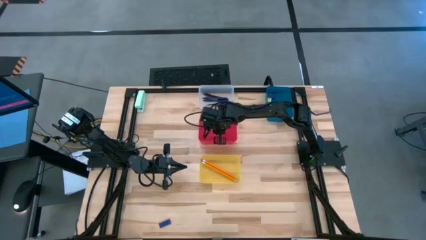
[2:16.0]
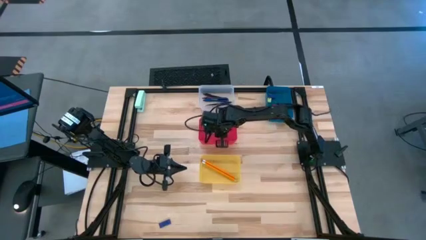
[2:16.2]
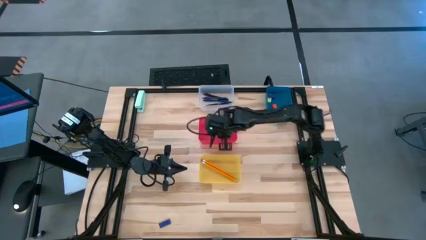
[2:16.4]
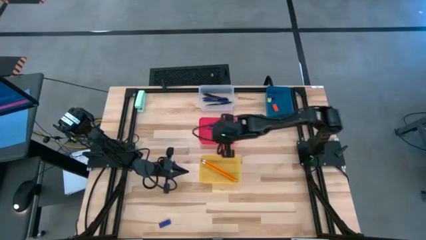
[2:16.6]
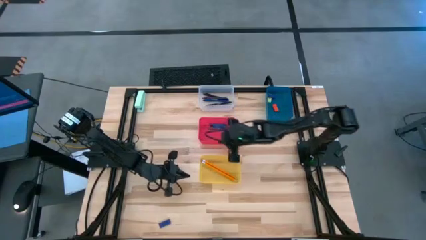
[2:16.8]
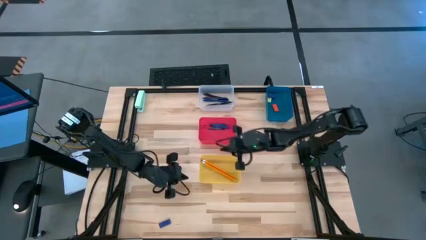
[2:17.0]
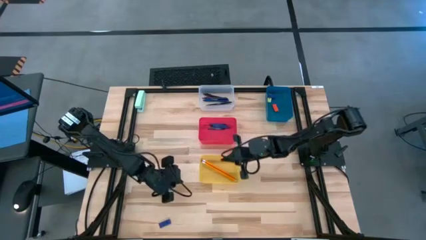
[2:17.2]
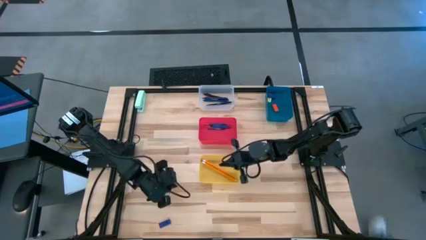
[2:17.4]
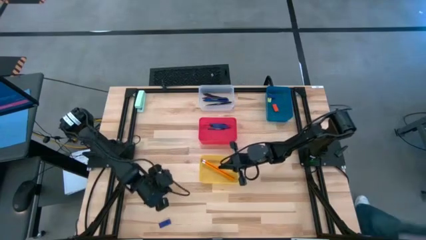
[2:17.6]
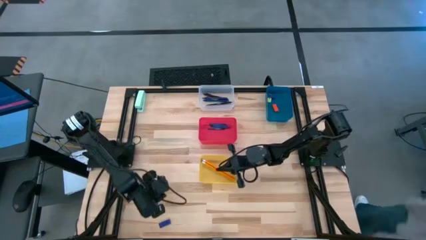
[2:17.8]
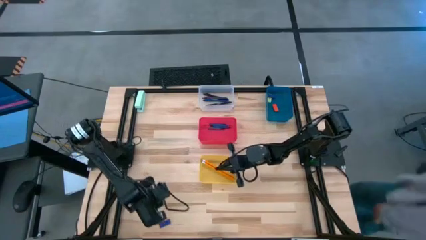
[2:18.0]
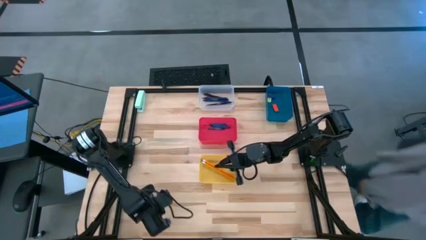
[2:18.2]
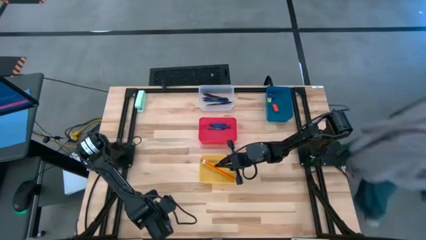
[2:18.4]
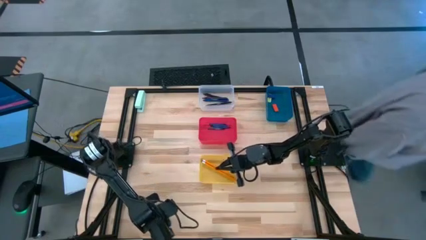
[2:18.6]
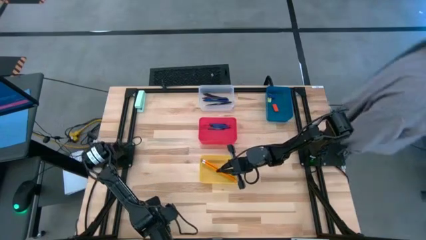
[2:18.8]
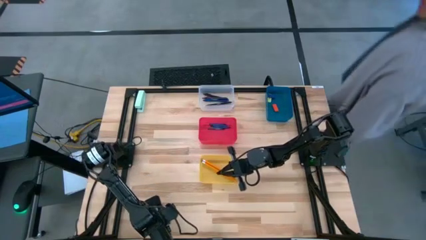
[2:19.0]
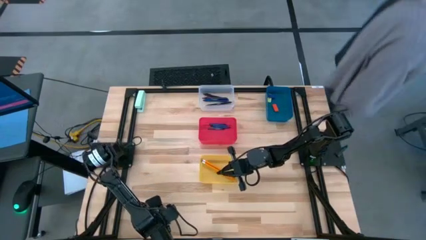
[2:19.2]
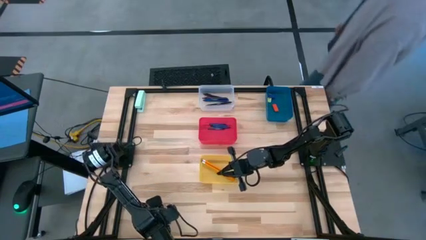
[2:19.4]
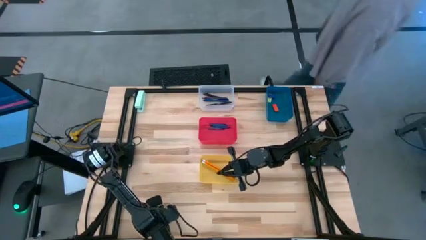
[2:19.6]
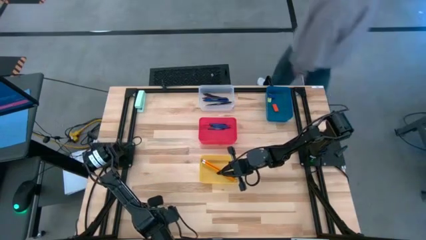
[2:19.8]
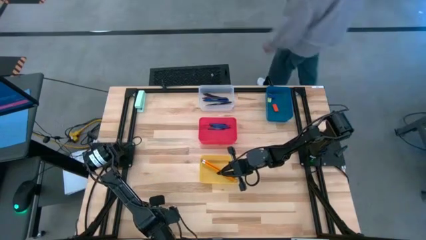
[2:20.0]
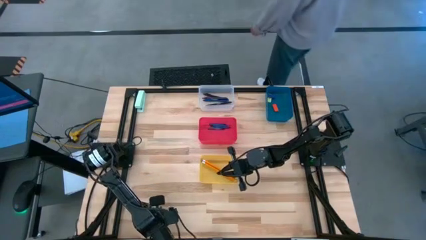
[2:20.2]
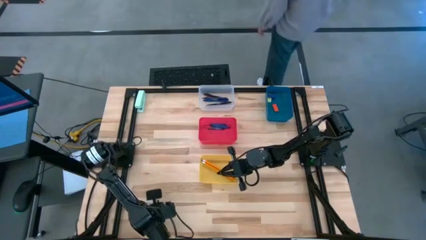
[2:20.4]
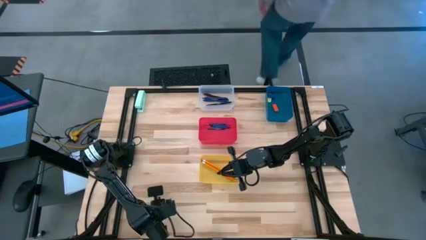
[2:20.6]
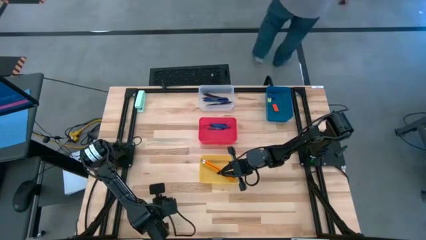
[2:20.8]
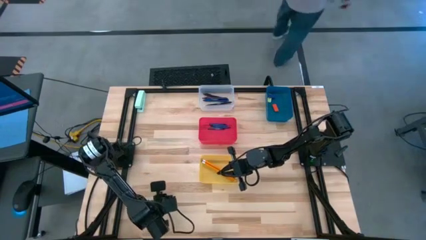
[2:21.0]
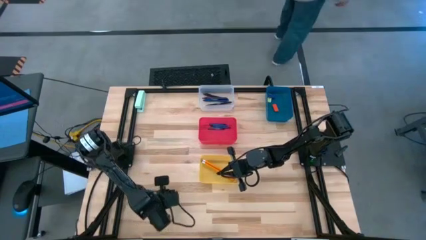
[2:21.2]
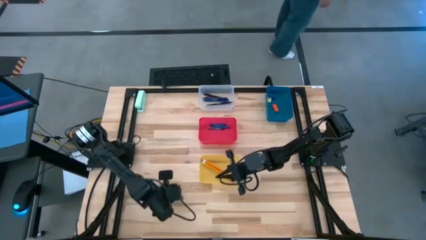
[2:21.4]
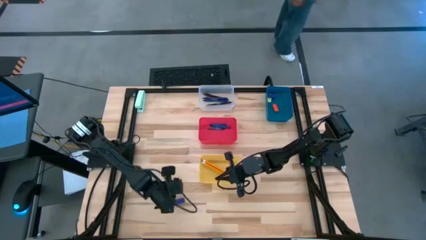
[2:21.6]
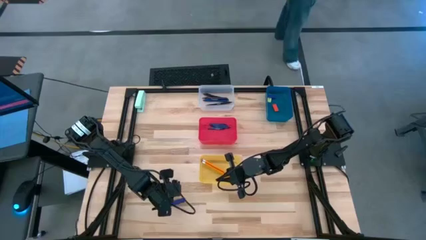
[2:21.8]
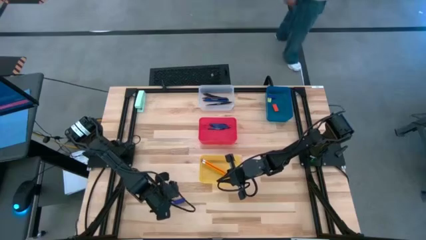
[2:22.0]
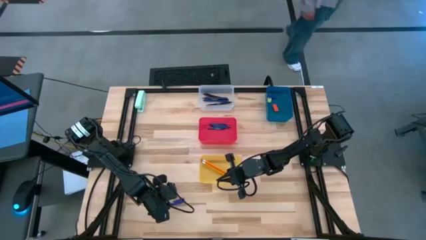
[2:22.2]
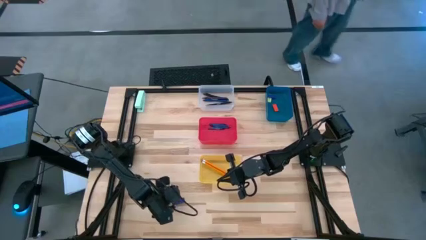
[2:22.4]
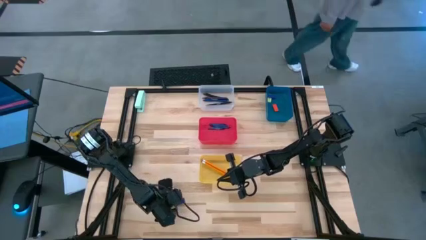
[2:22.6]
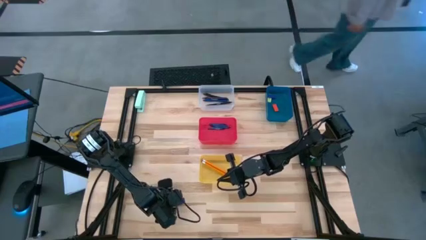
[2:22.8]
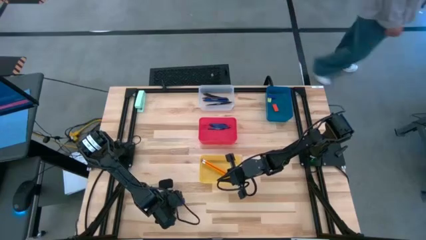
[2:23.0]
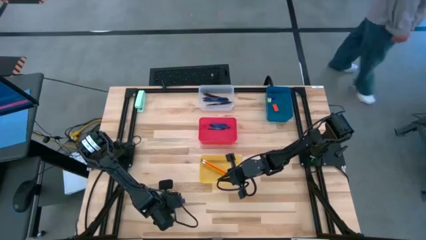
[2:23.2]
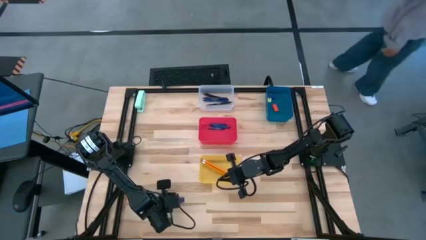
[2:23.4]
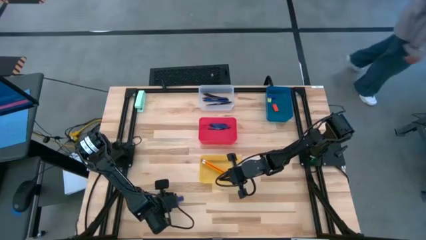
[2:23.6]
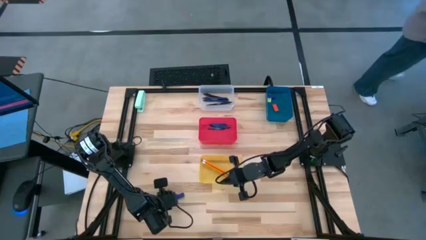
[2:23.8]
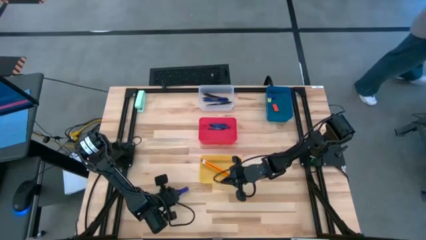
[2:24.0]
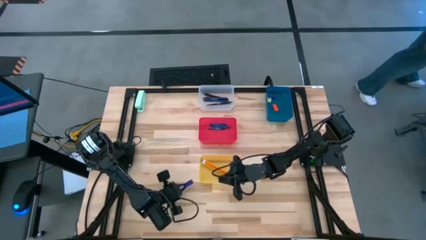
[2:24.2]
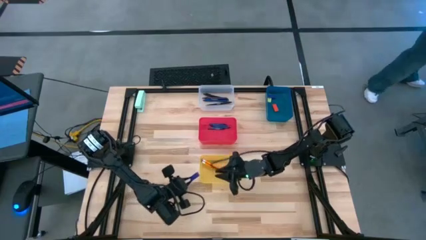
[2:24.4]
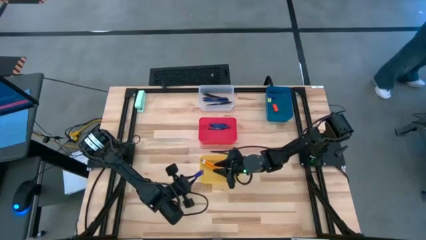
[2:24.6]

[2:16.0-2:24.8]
Task: Sort crayons/erasers/pens/pencils in bins
Put the blue eraser into the blue bin

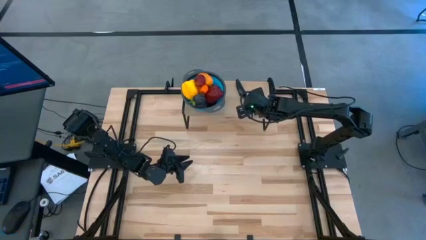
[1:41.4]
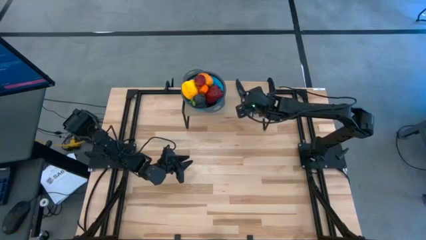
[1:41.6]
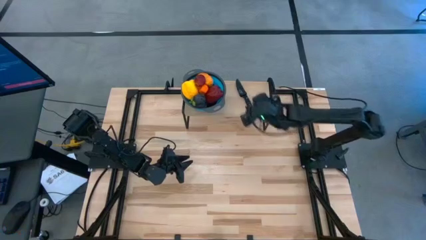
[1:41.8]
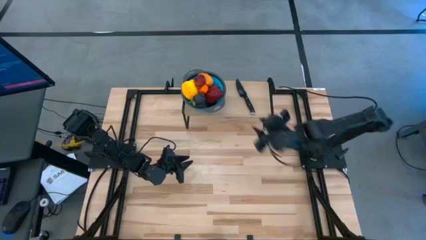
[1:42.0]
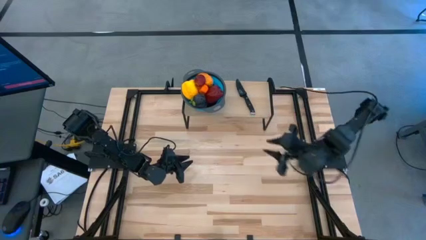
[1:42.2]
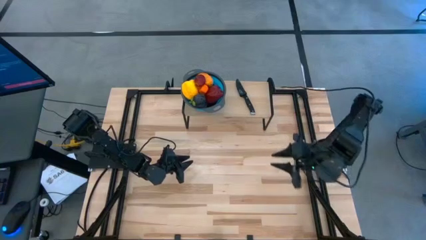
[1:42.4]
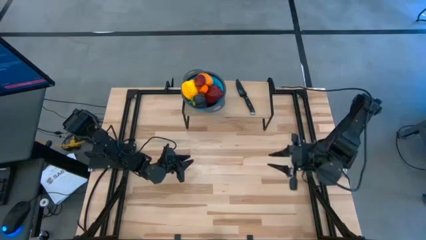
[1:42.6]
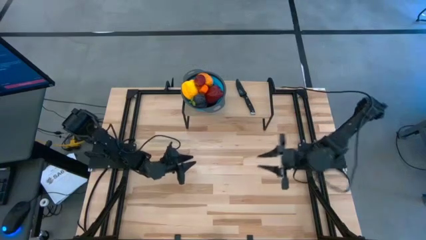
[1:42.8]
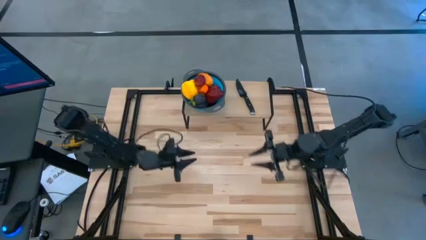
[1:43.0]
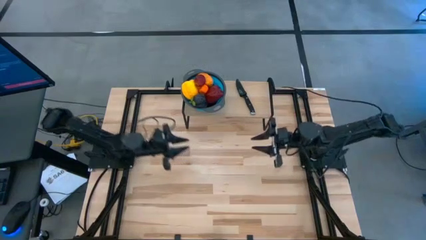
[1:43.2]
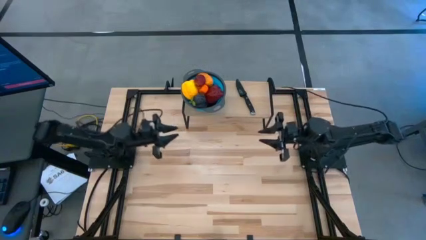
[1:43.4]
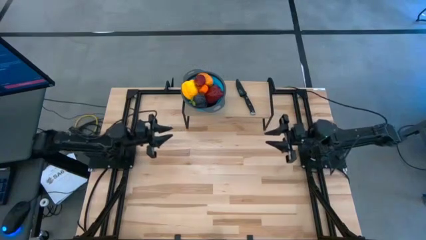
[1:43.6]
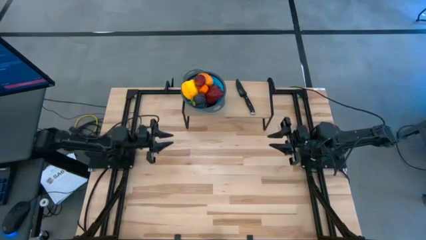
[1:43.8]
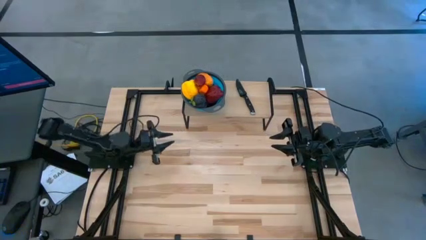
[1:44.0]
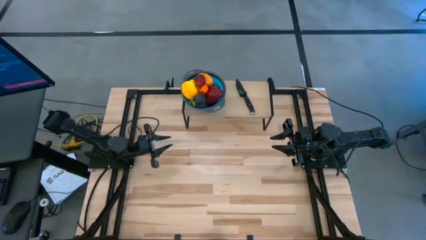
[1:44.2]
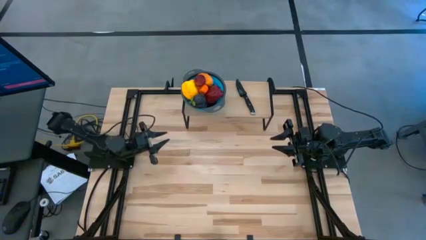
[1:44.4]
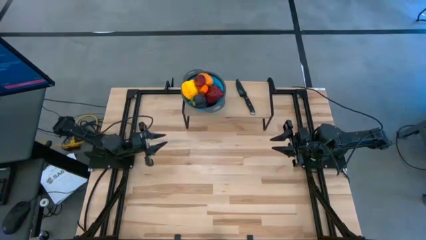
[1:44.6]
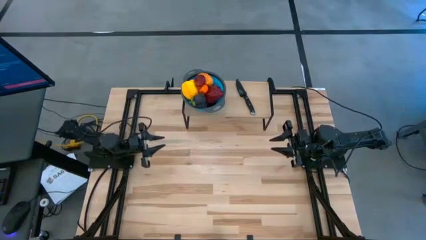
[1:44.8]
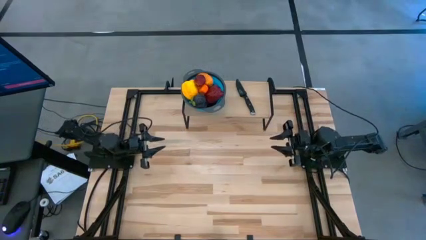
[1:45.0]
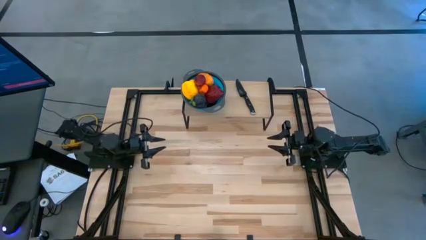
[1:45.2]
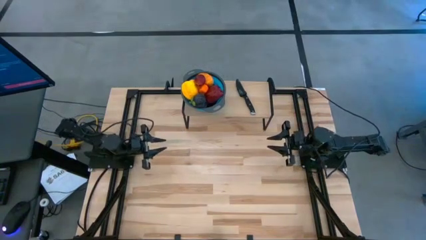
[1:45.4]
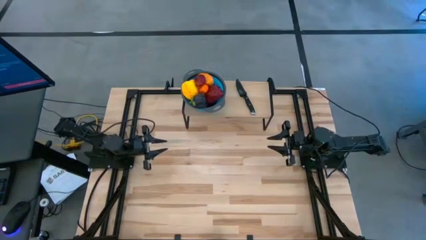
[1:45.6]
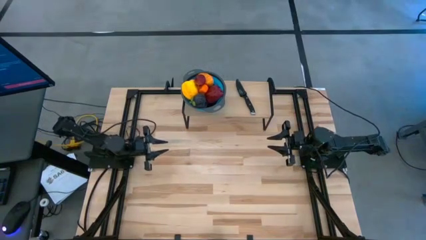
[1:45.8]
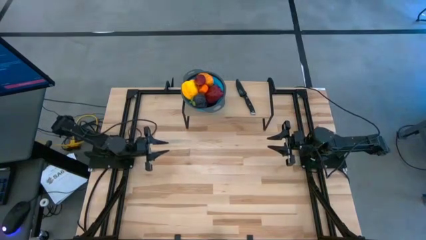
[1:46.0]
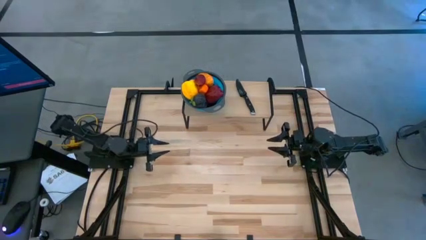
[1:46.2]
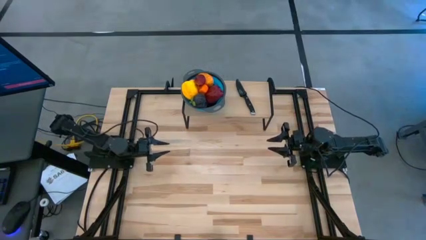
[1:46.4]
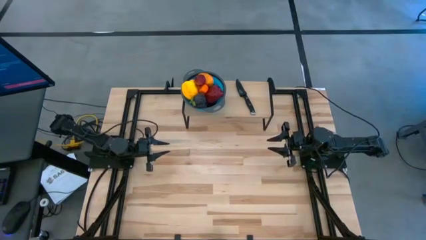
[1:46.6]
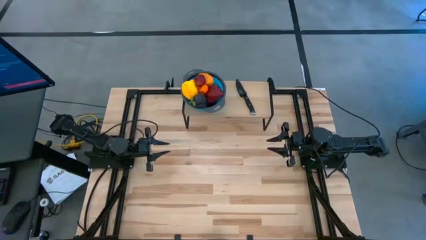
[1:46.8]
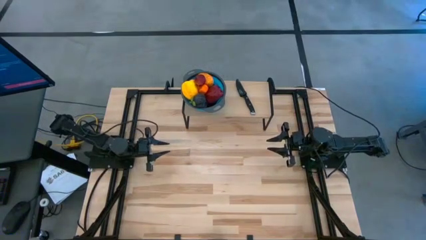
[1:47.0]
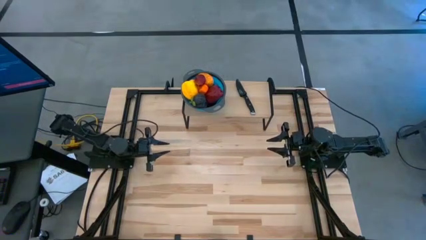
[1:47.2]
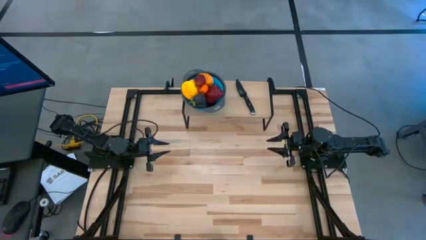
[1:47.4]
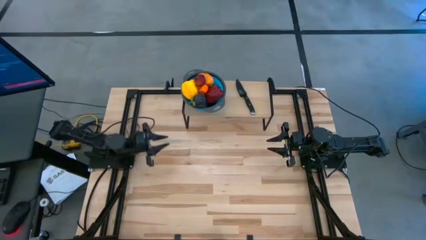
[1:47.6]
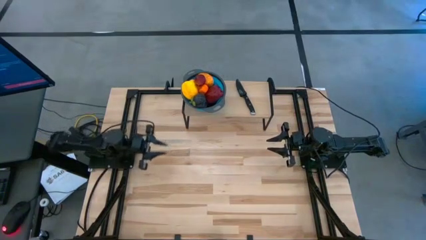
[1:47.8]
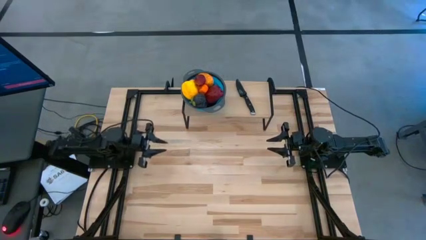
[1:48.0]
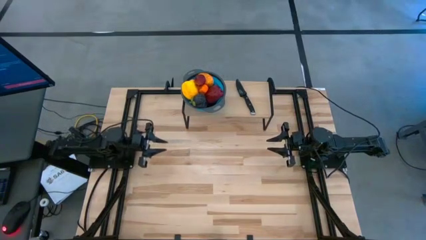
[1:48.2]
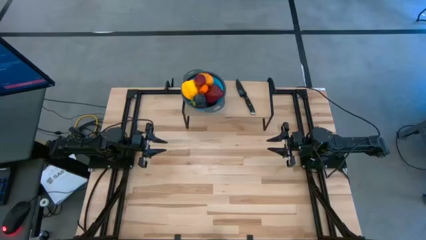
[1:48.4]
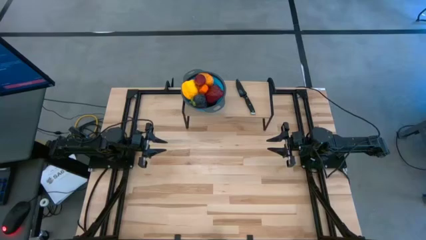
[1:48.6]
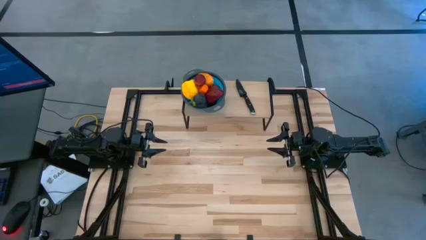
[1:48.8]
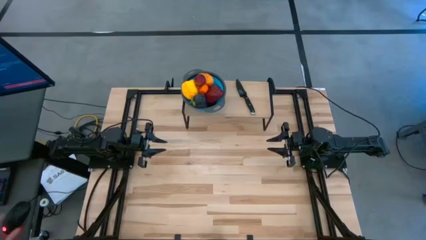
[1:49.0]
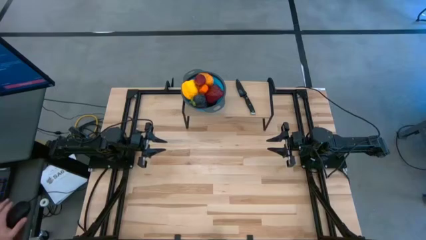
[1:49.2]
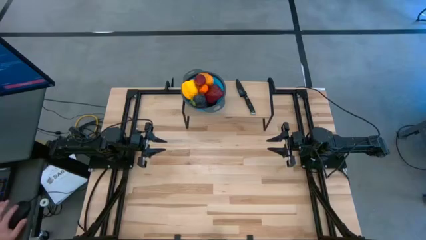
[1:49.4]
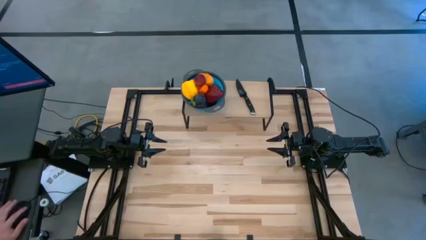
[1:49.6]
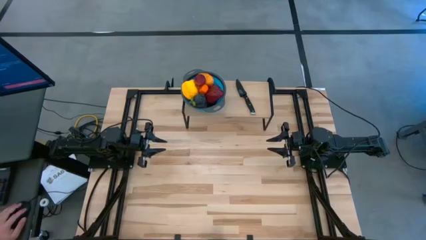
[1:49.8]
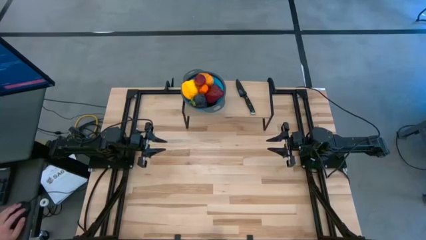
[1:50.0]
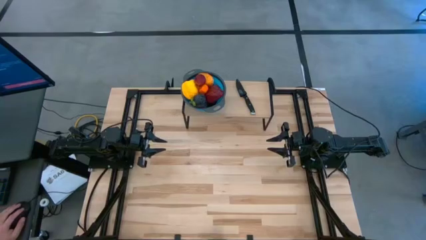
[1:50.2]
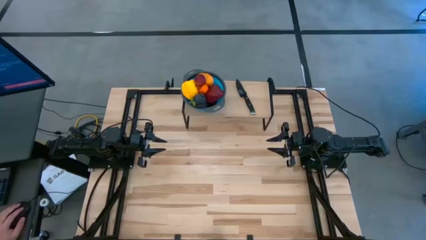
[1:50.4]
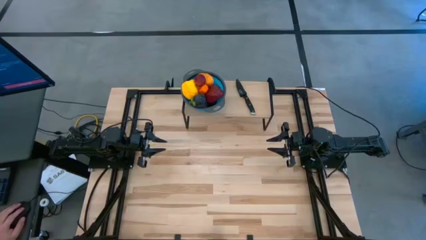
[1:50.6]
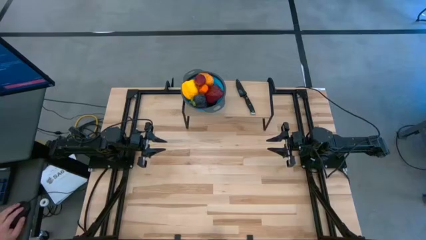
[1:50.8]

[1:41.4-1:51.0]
Task: Pick & Place Fruit
Return to Home Position
